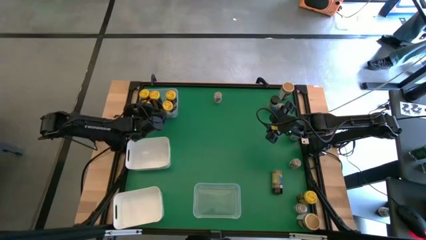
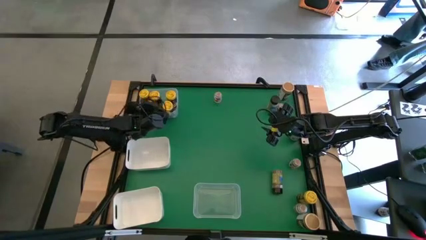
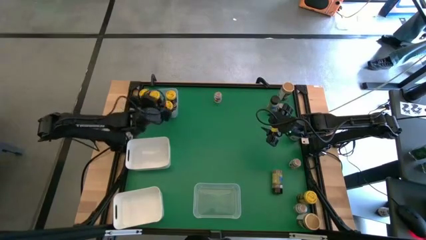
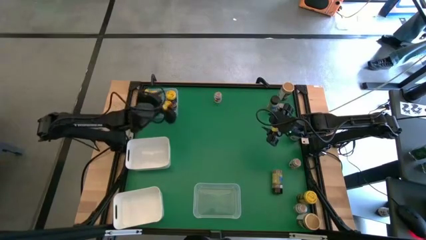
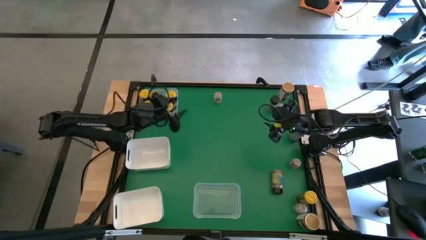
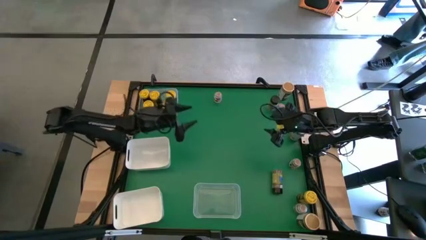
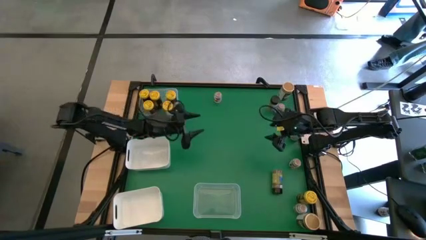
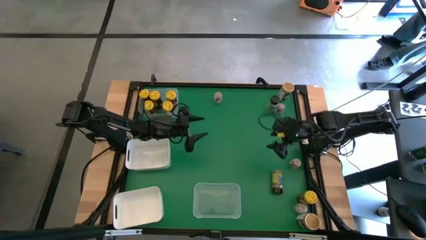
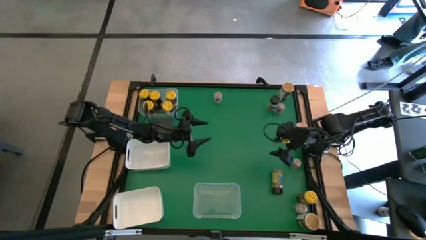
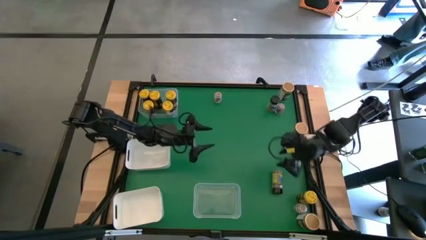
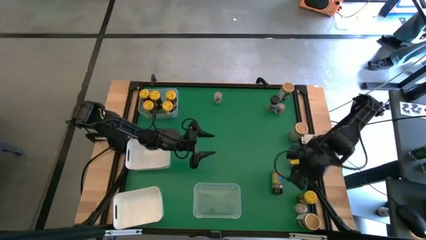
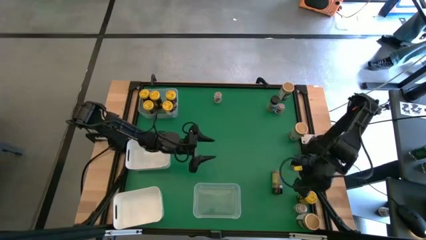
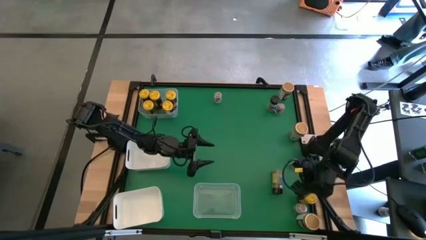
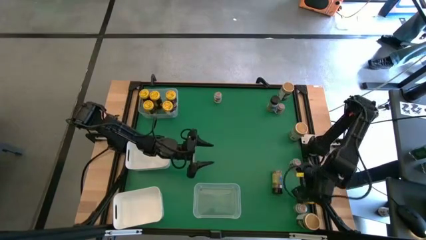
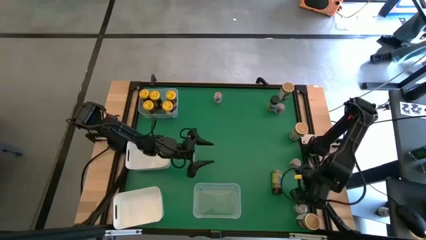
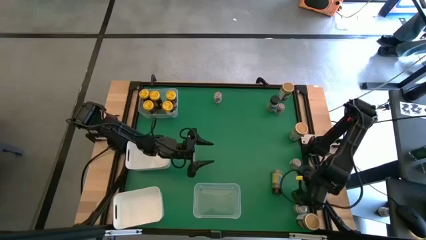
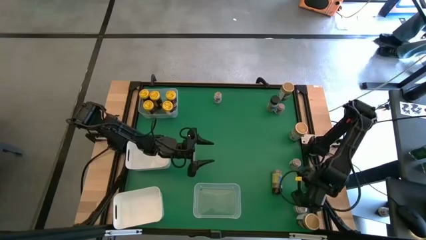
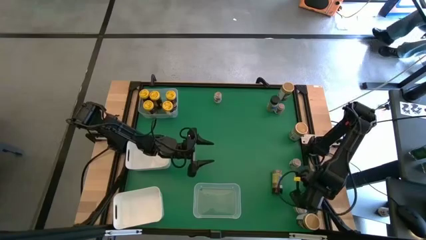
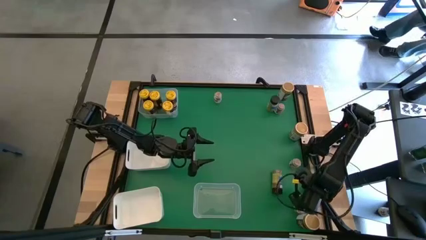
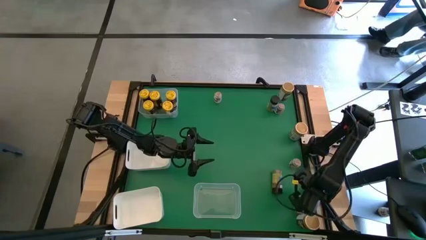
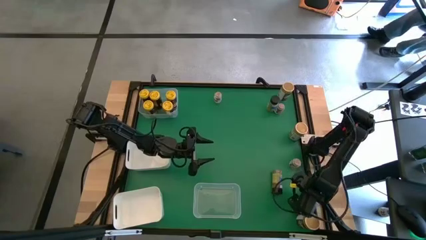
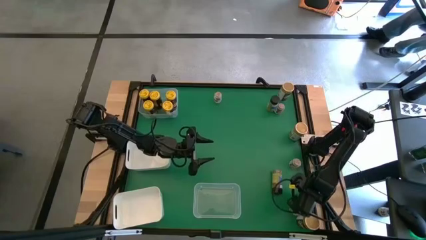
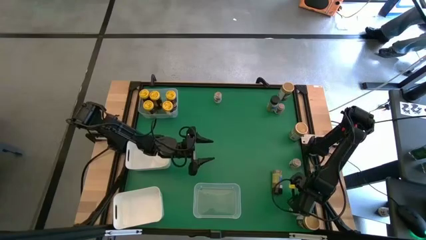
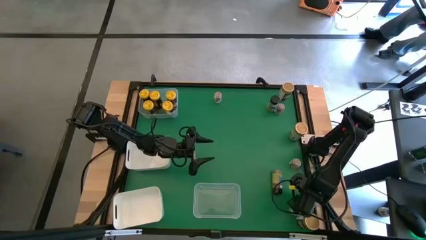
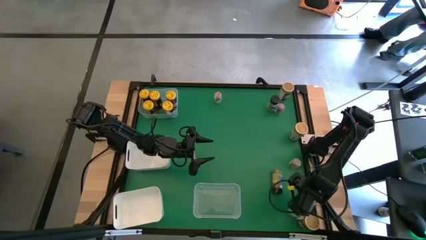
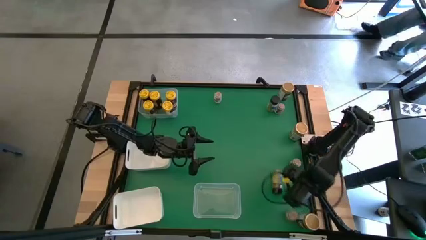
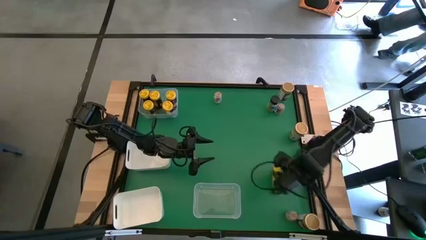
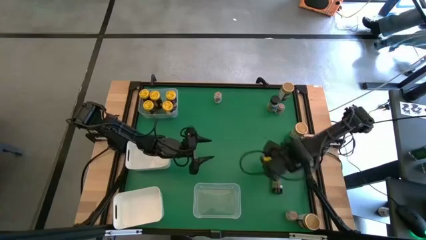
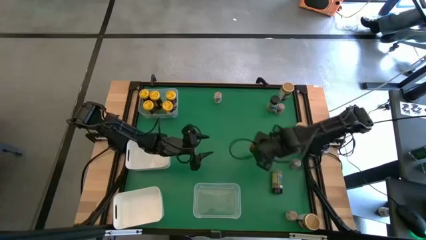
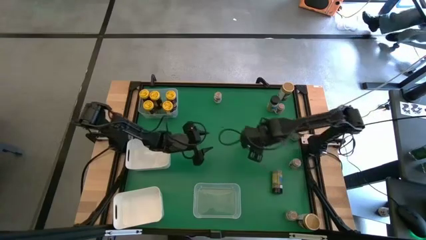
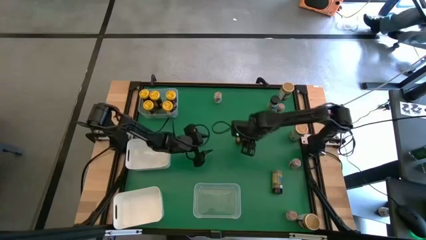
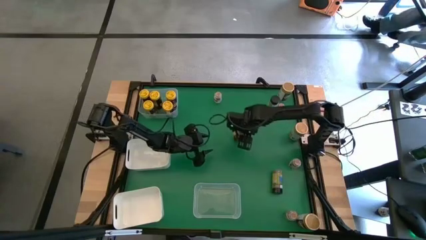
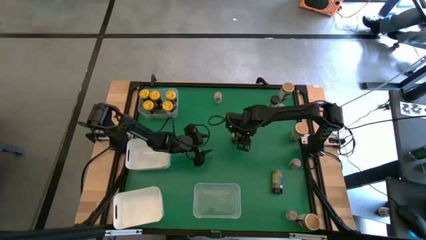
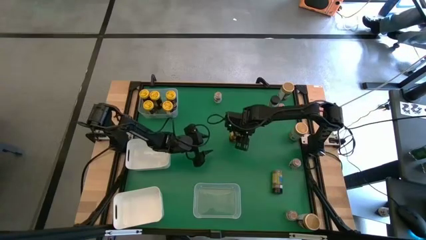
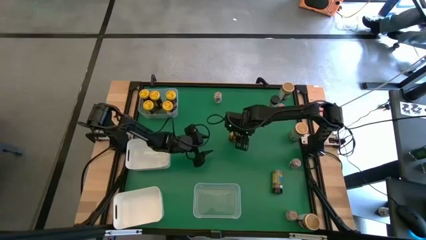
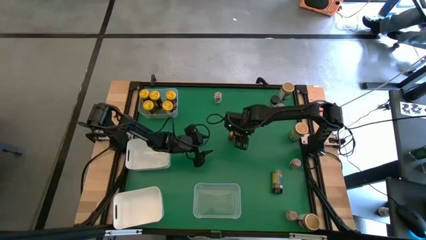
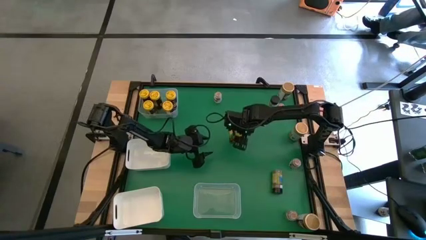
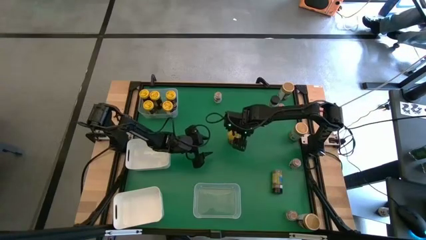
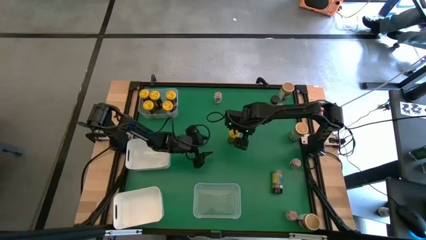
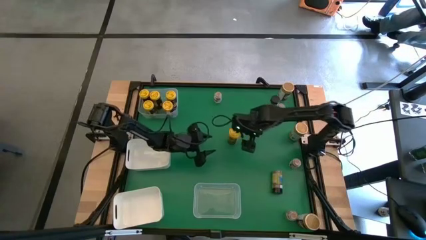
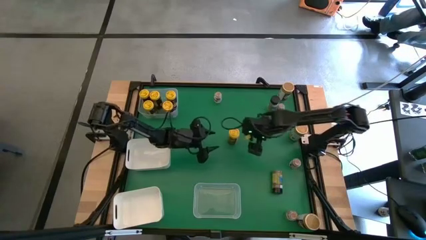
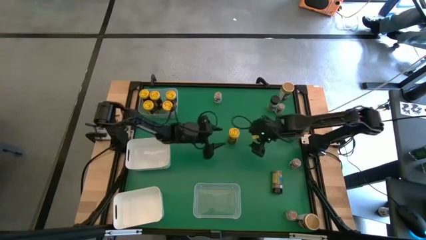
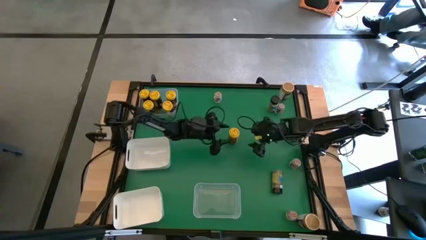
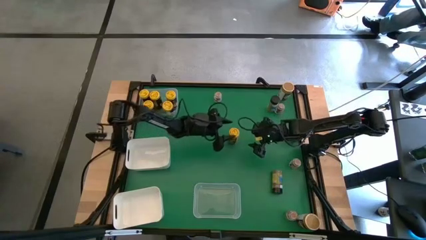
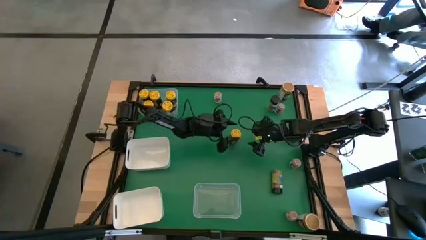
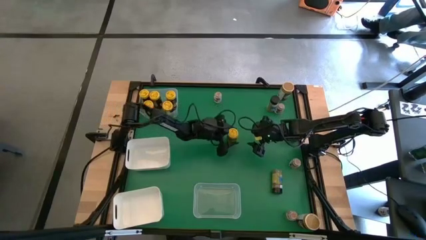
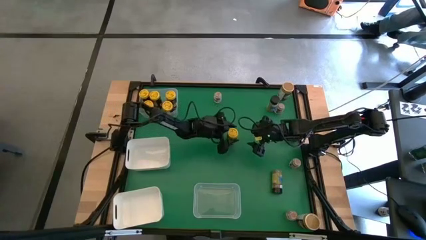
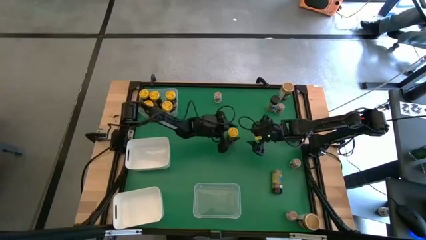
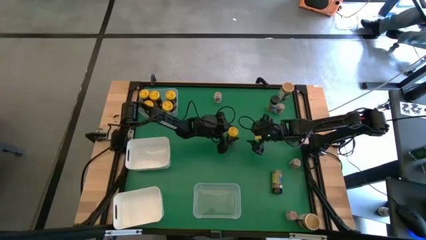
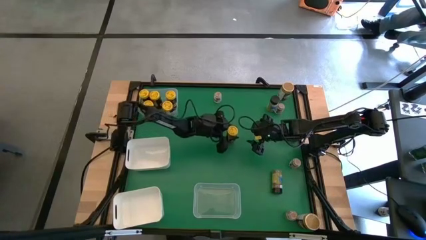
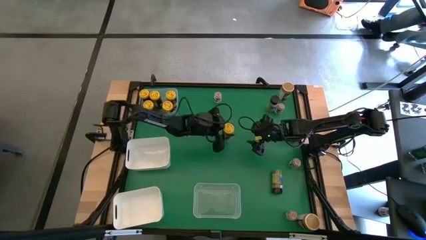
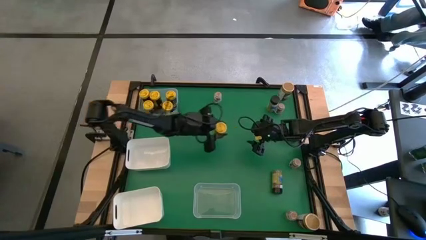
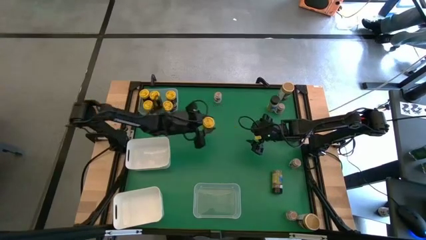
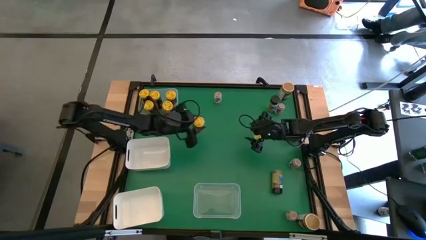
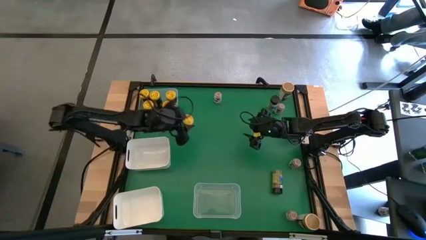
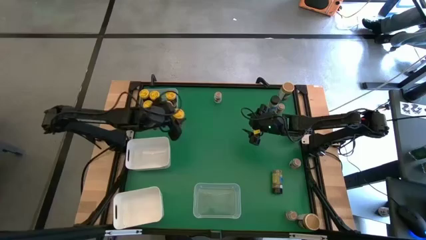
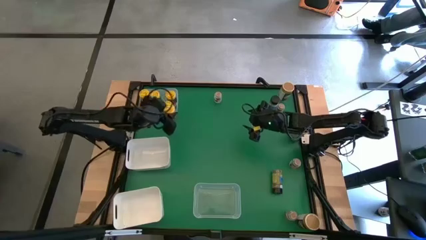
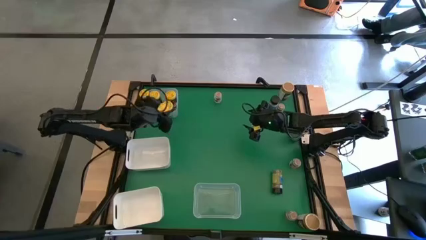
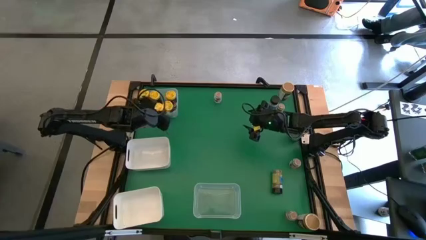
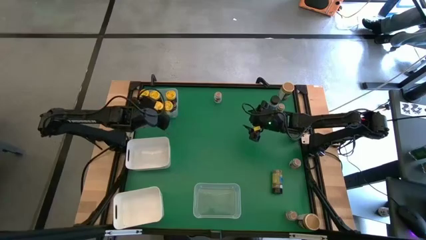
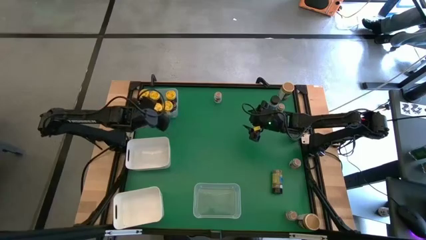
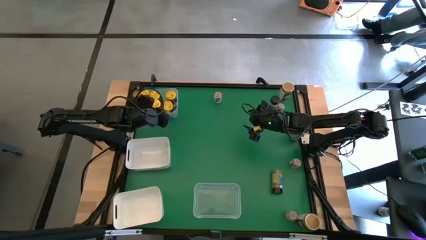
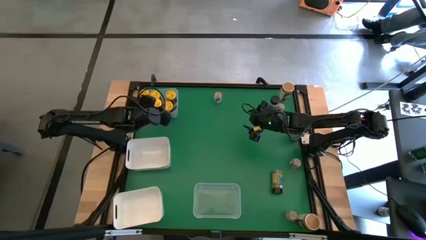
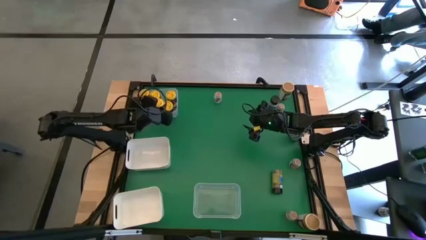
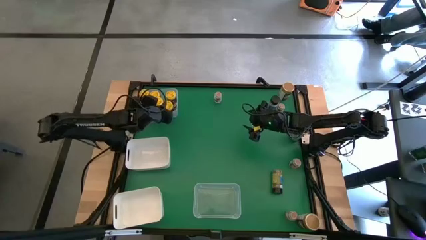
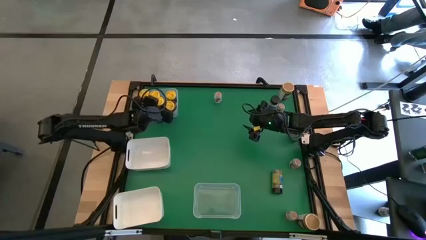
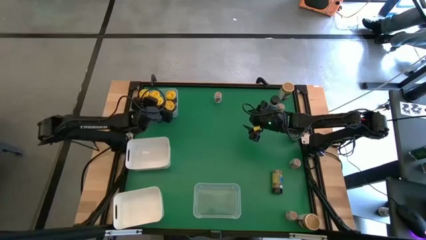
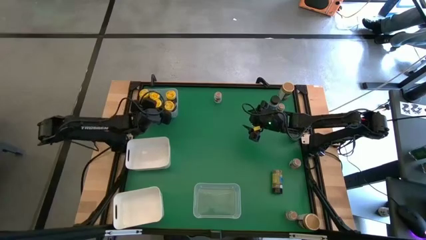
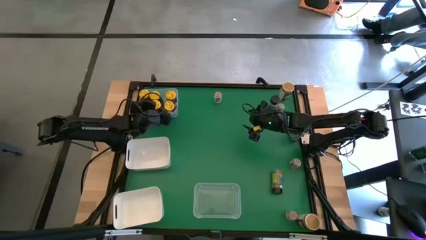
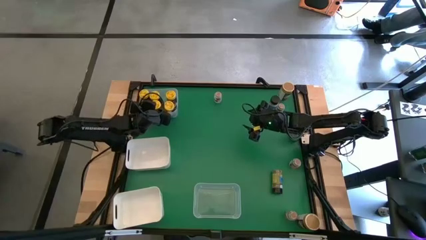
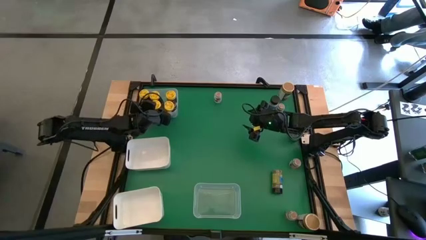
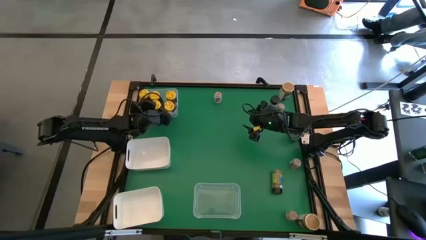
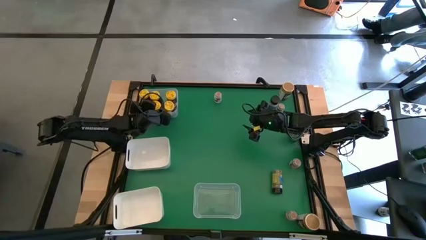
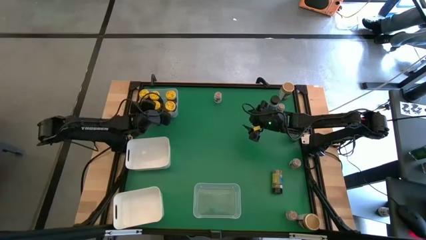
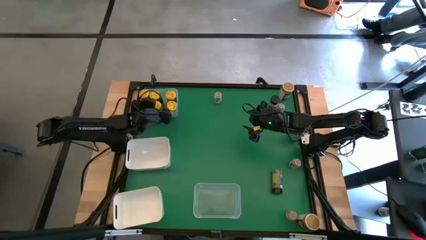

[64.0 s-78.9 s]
Task: Sort spices by type
Put the brown spice bottle into the top white bin

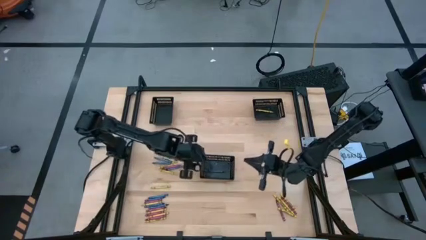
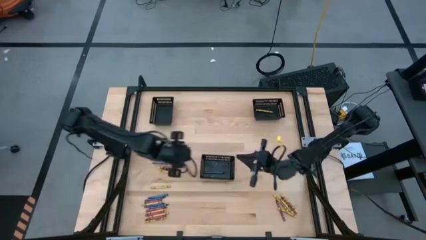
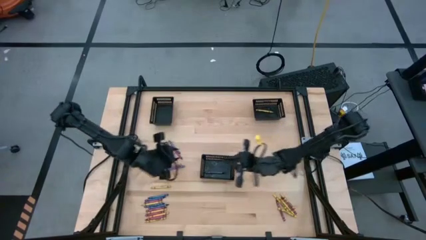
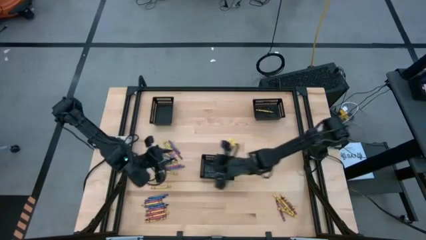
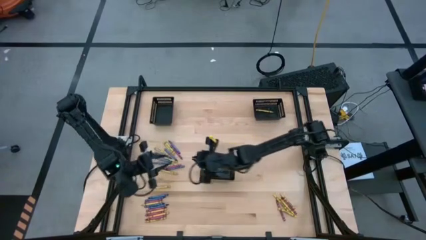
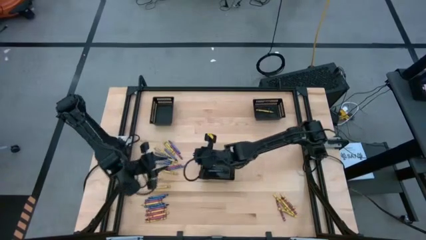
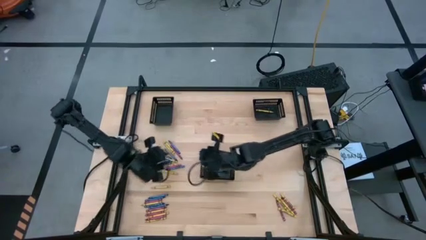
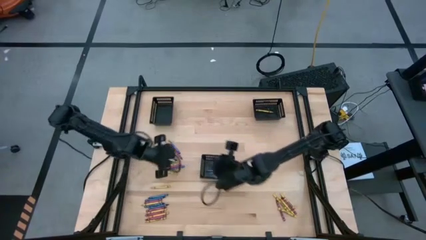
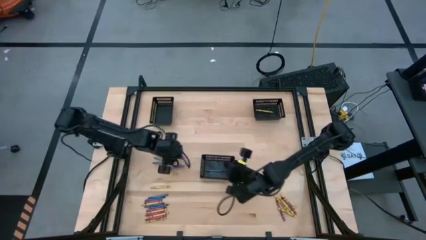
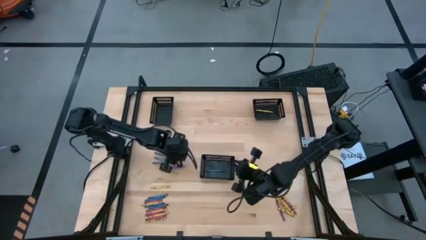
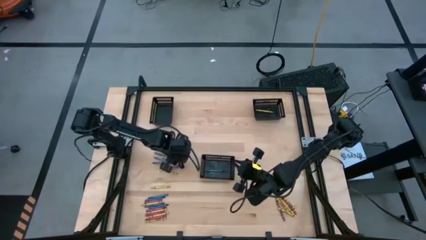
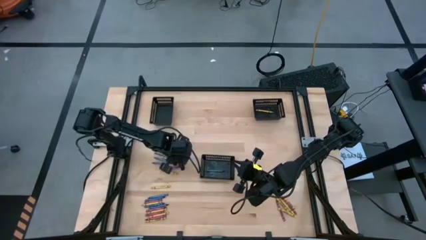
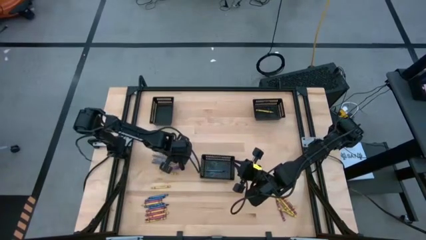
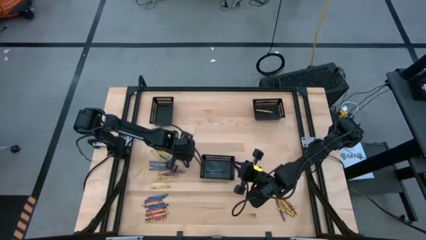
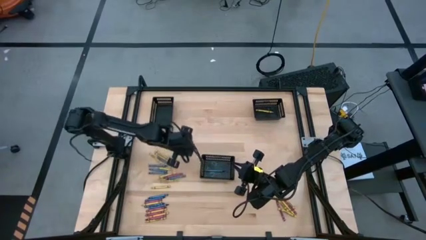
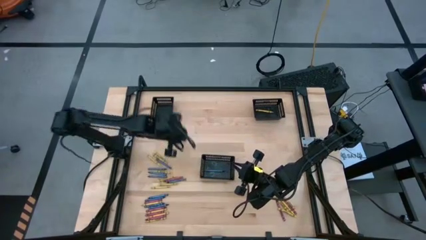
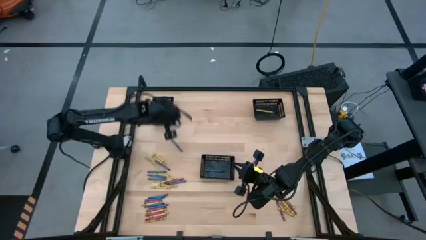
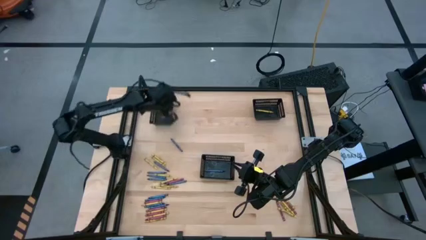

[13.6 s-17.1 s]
Task: Sort crayons
Put the pink crayon into the top left black bin
